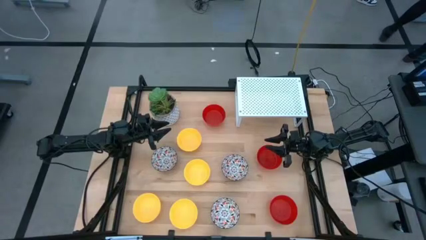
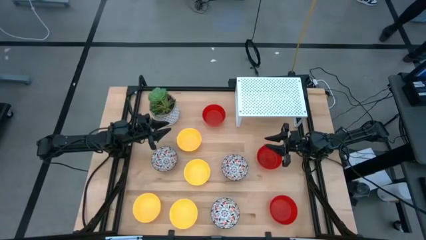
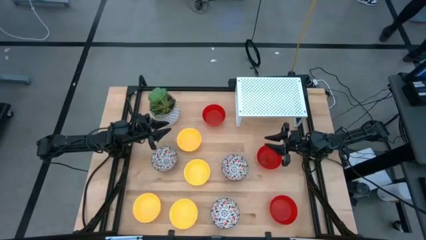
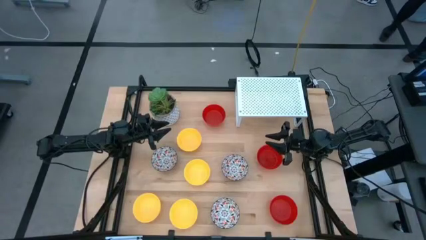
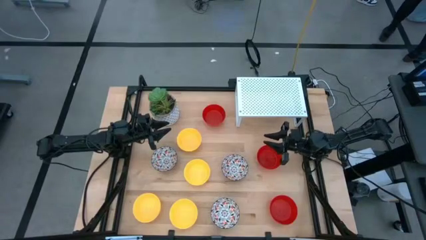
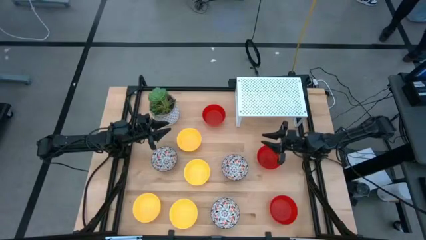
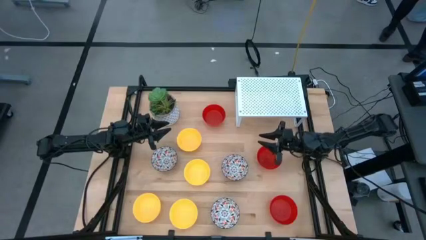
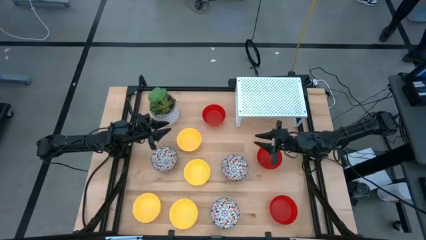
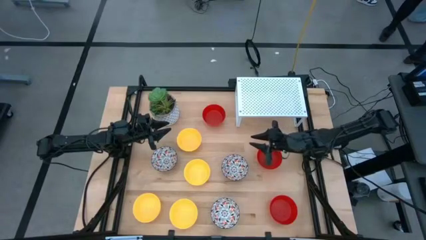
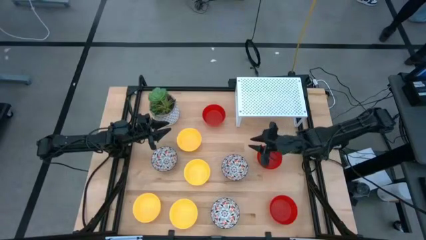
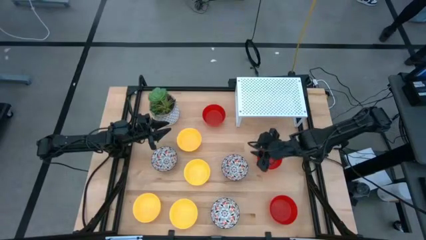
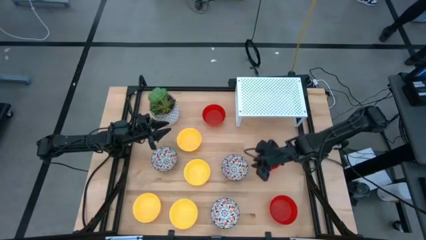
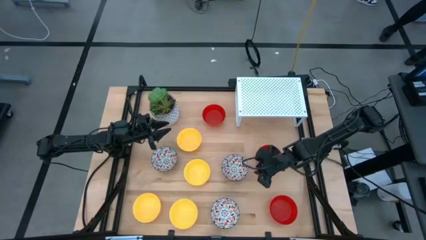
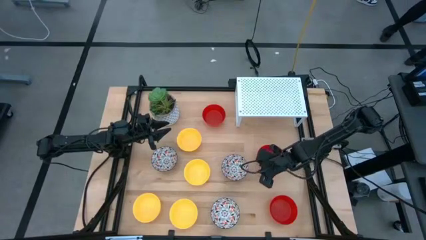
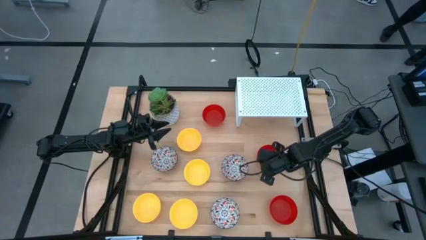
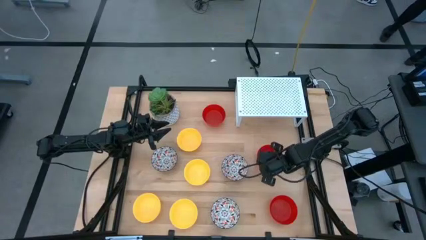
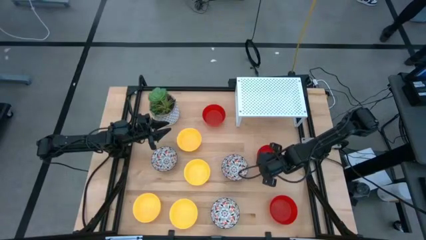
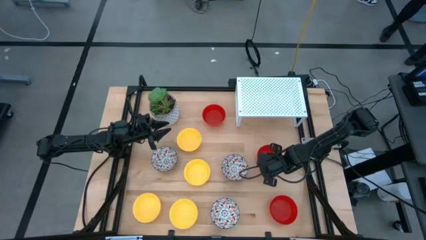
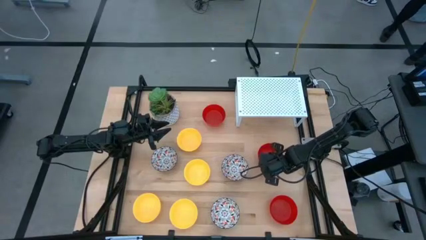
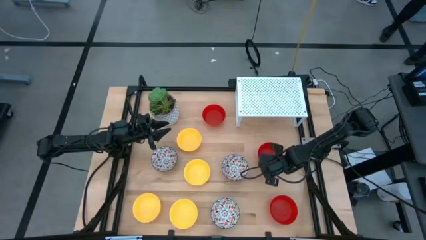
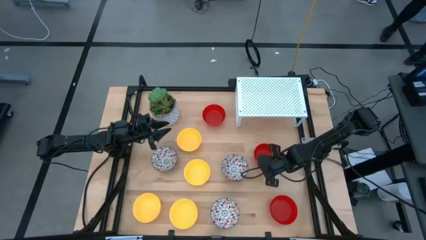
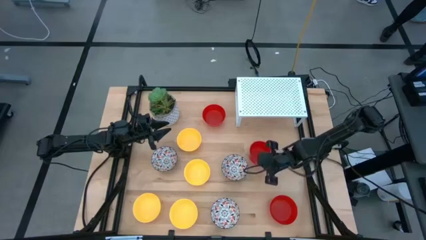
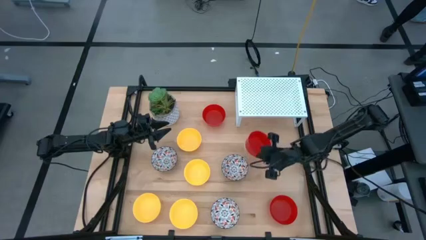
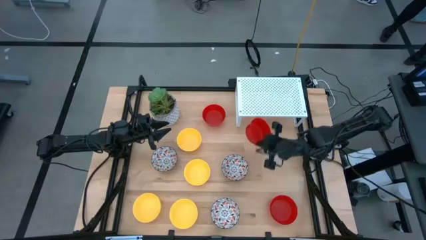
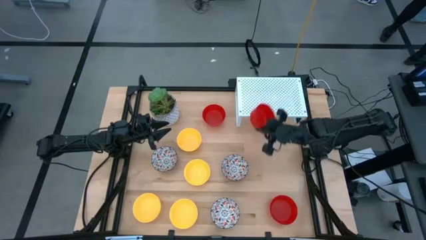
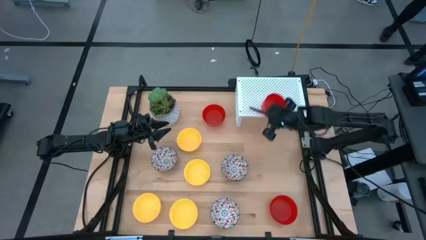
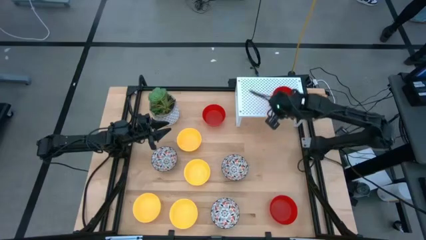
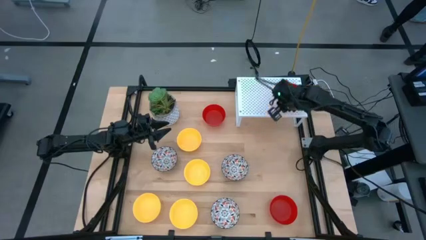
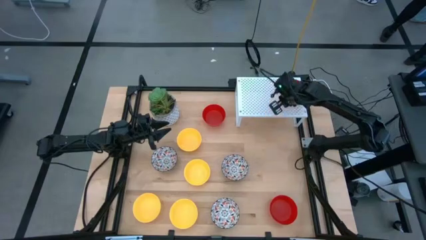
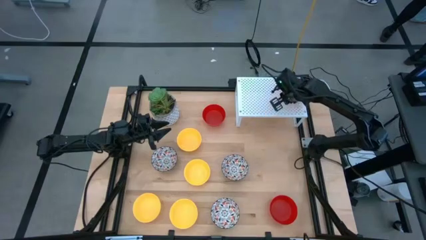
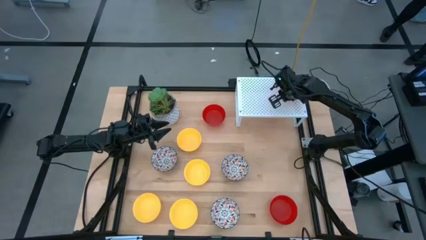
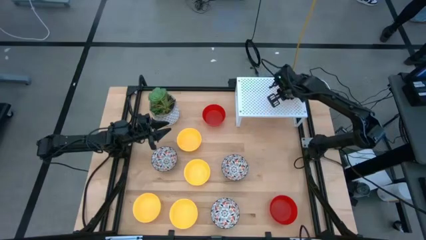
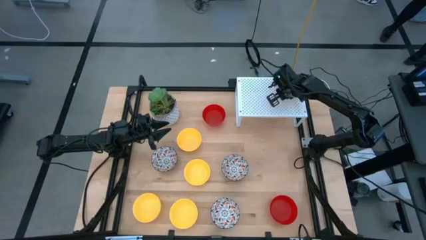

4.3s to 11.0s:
Task: Pick & Place Mini bowls
Put the middle red bowl on the shelf

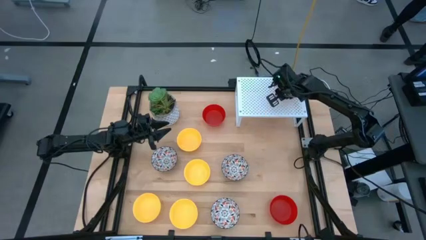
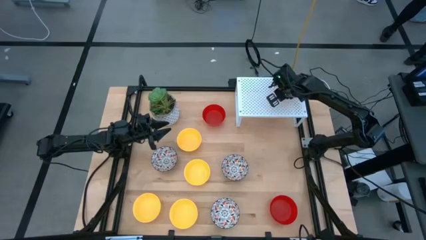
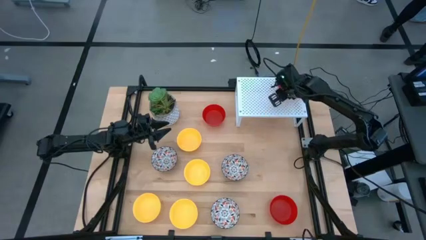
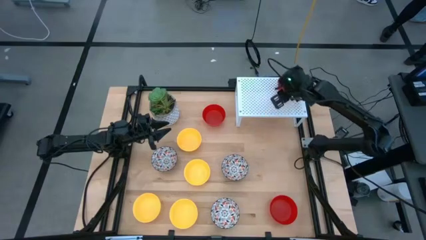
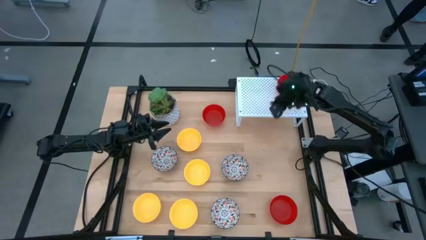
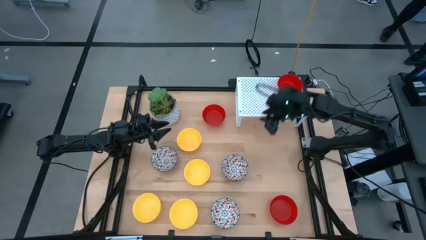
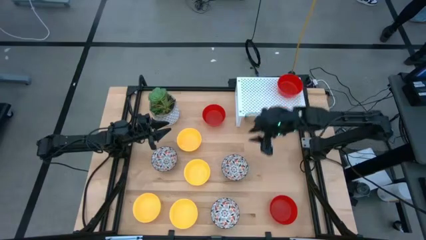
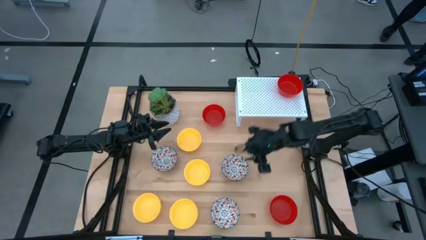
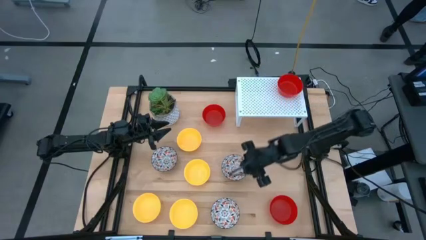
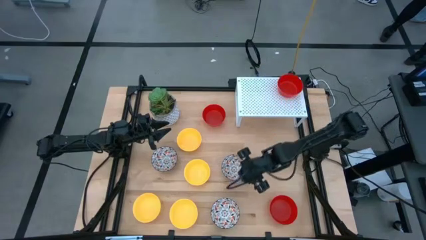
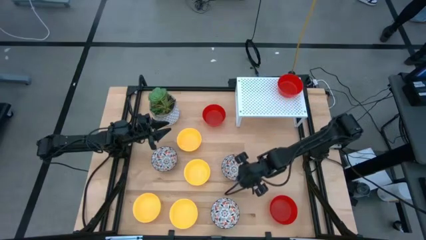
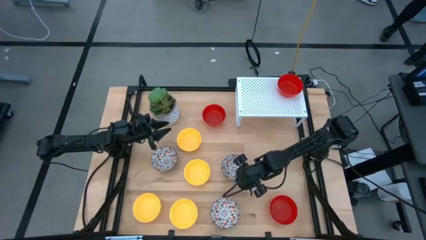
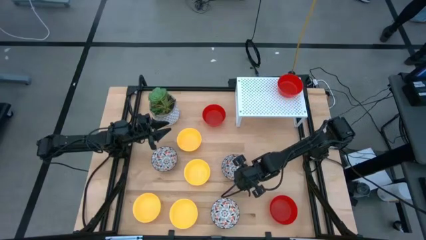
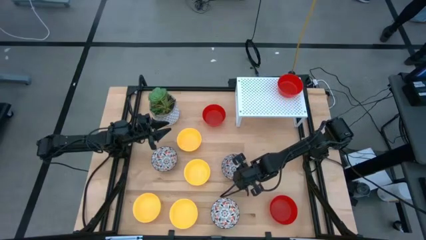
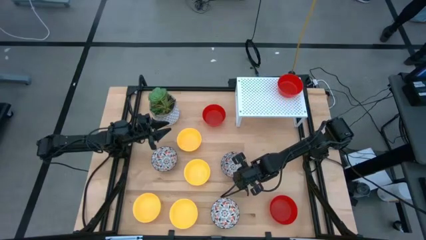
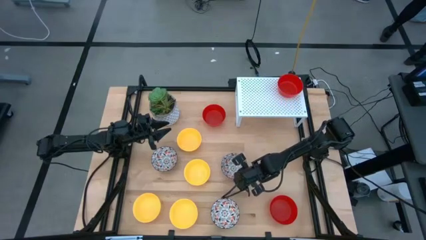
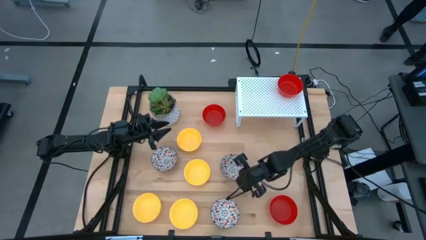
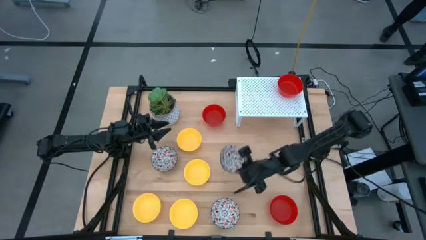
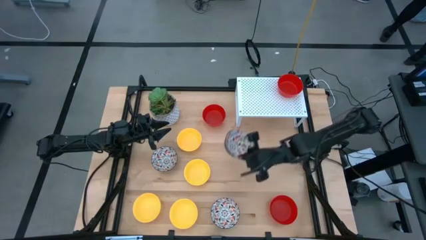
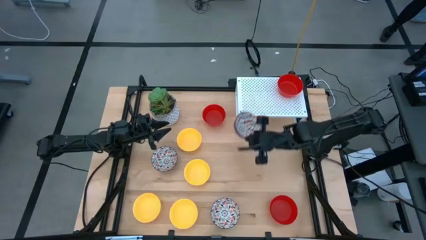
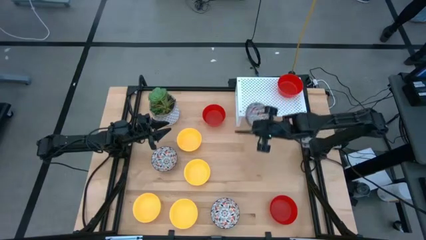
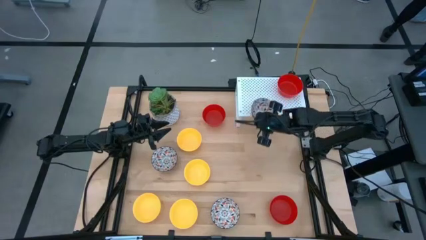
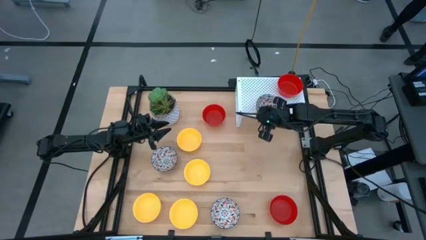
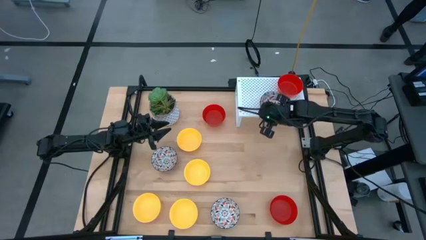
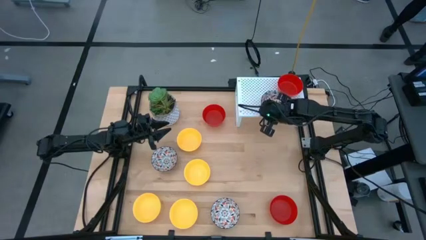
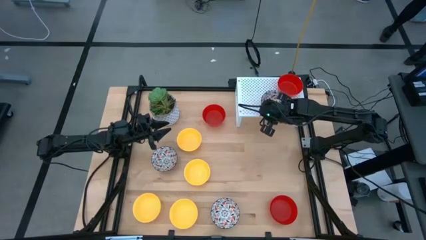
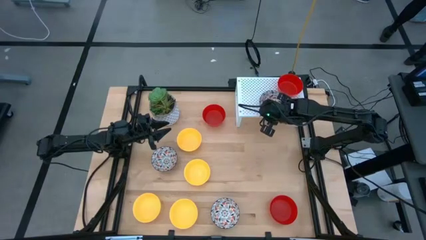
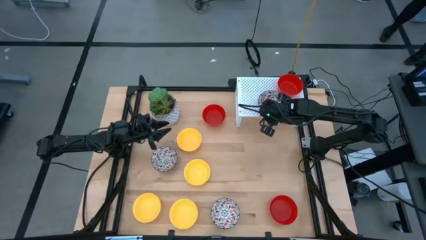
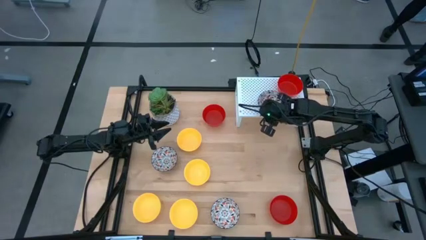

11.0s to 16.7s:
Put the top right white patterned bowl on the shelf

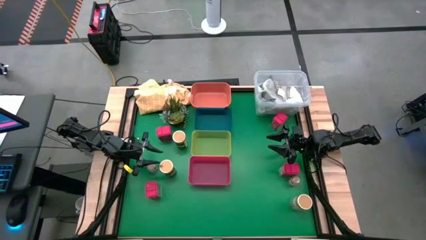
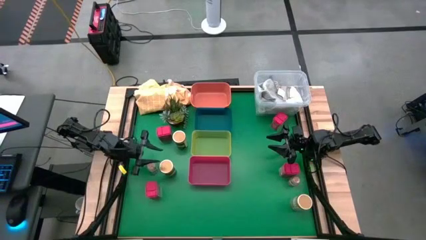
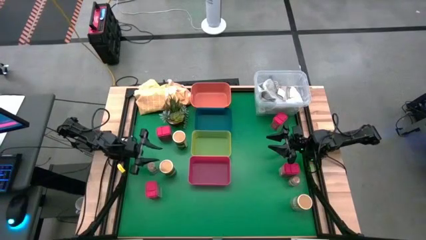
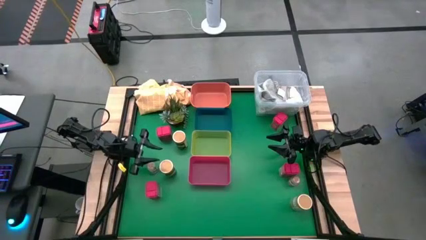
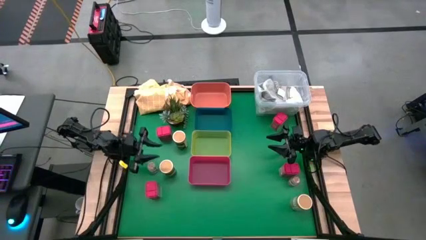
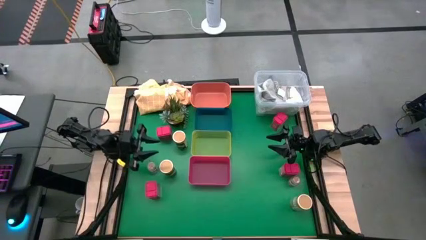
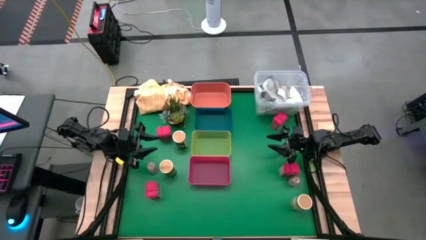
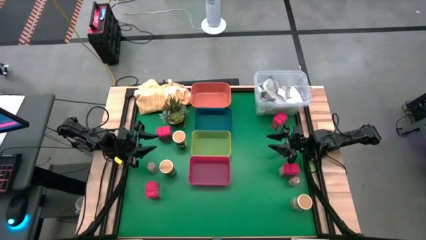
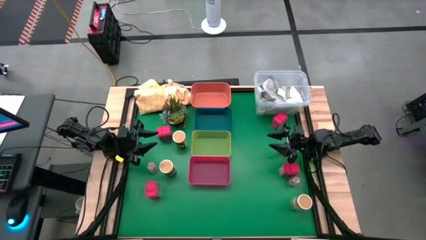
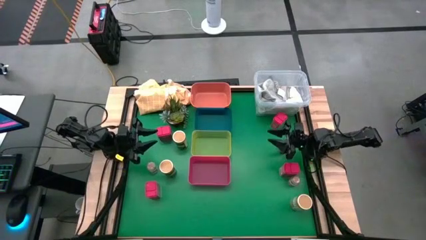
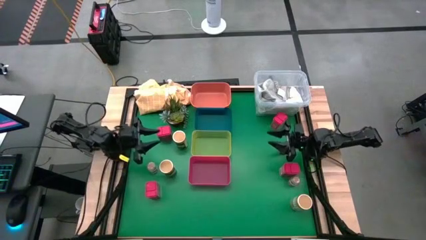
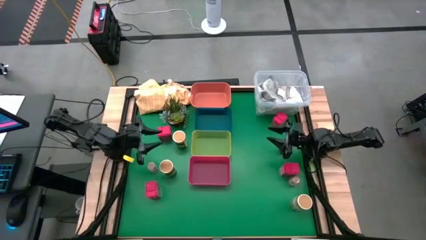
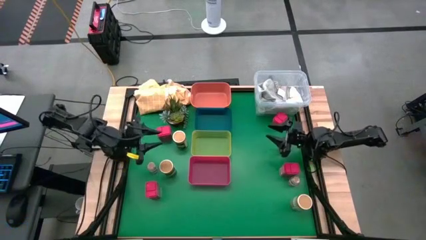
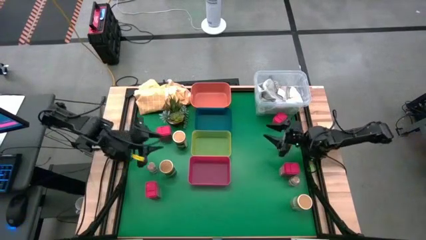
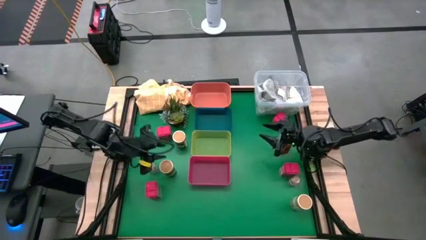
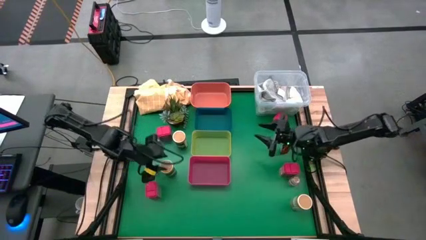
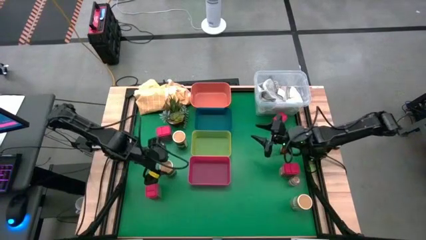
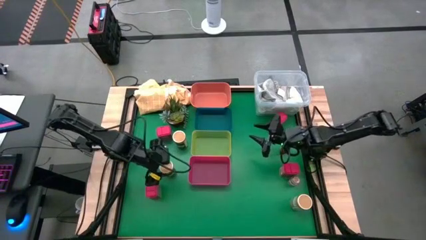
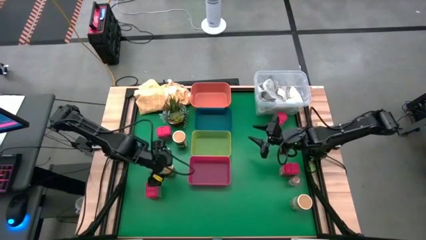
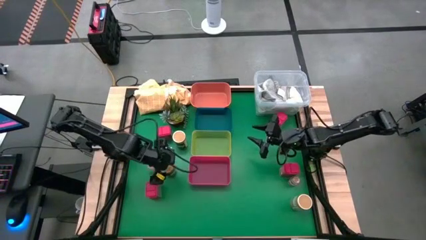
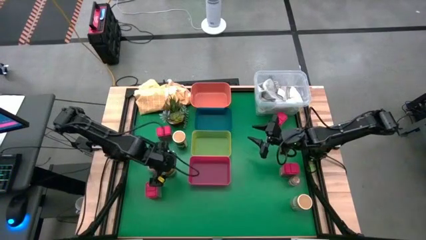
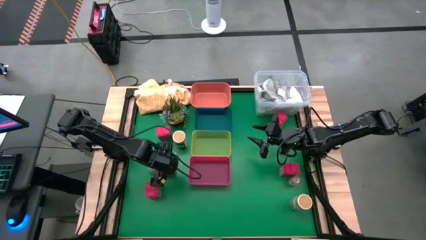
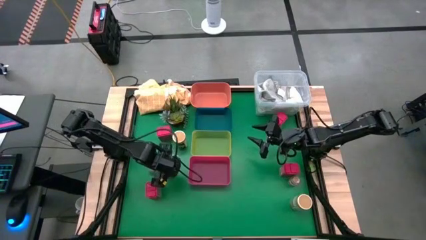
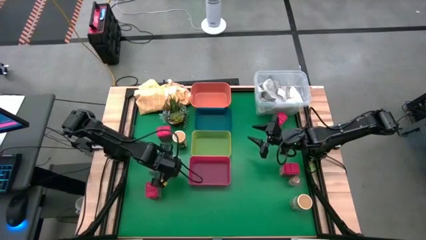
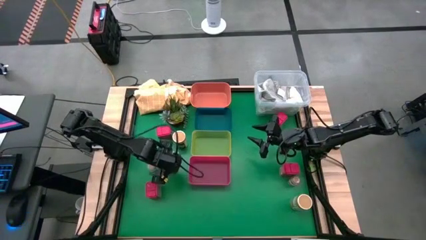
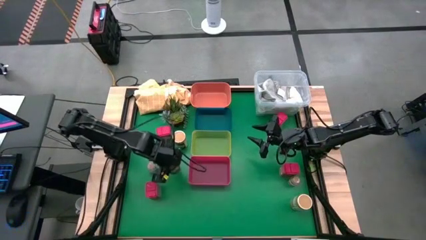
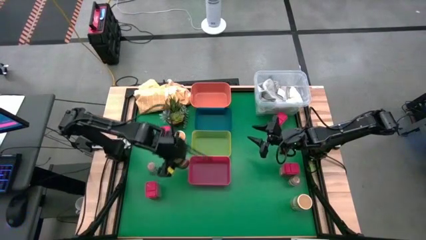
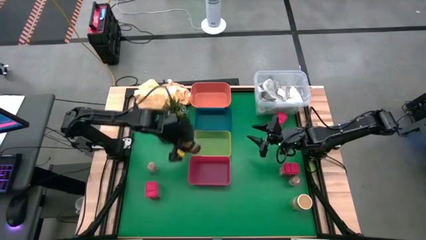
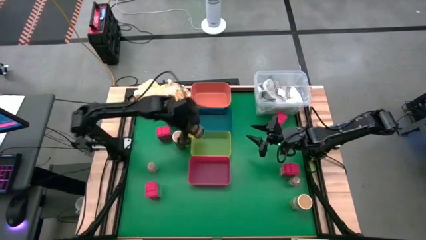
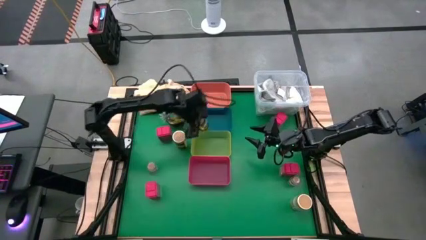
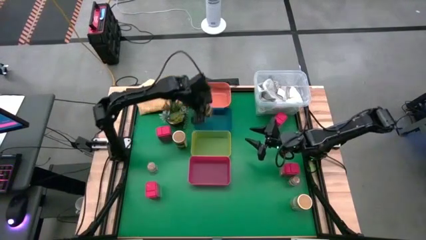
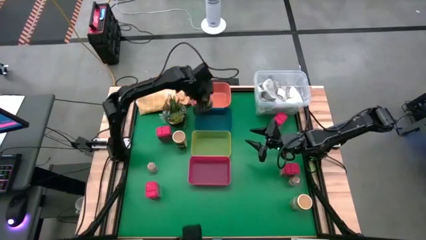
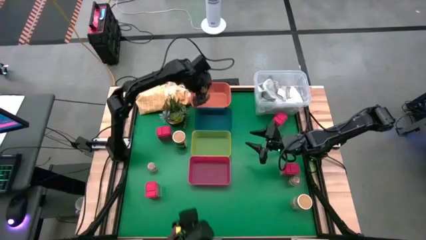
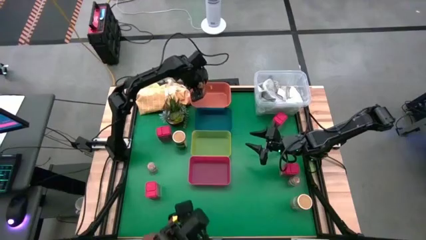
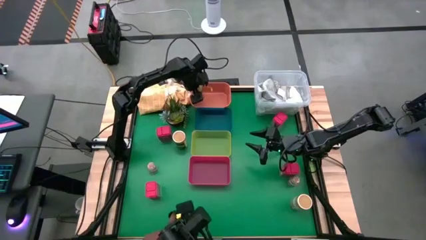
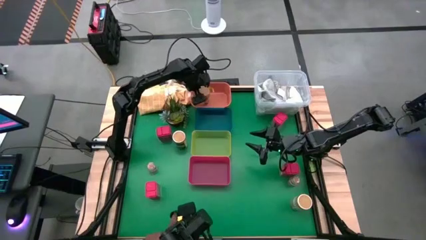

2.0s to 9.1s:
Task: Sort spices by type
Put the bottom left gold spice bottle into the orange bin
